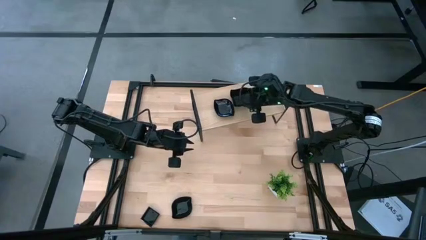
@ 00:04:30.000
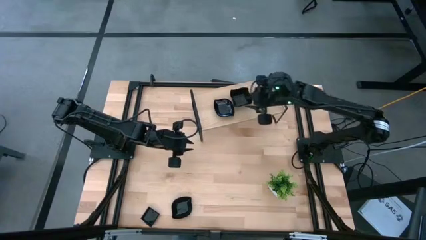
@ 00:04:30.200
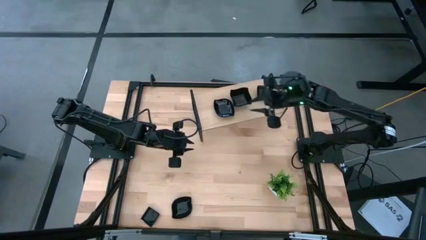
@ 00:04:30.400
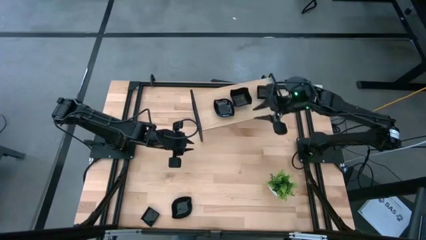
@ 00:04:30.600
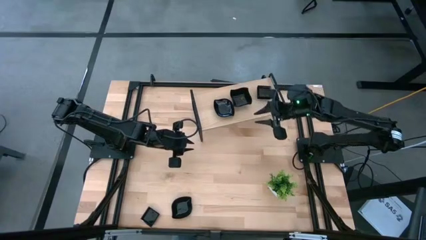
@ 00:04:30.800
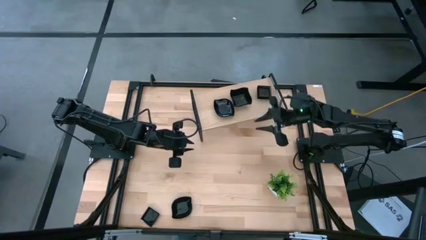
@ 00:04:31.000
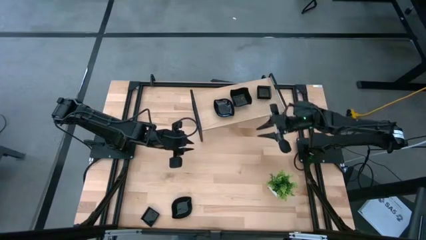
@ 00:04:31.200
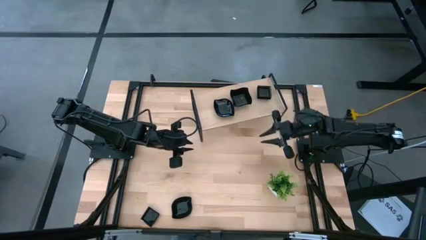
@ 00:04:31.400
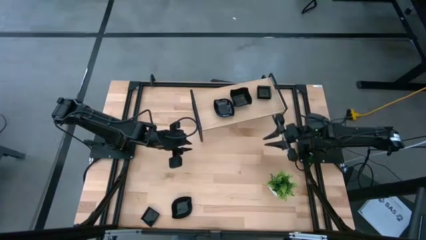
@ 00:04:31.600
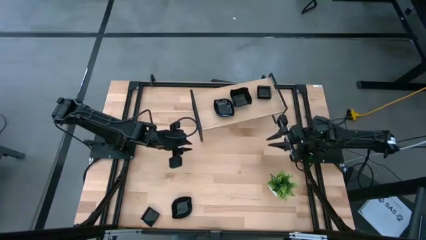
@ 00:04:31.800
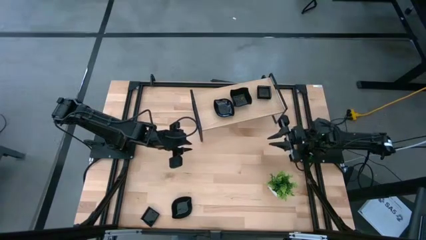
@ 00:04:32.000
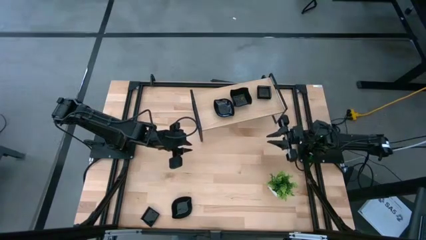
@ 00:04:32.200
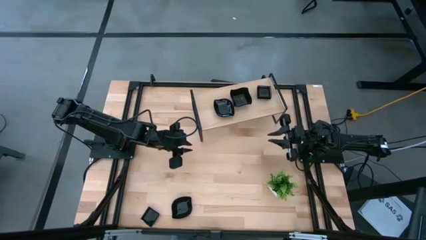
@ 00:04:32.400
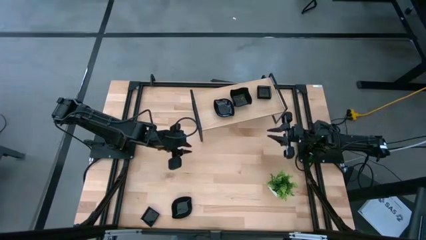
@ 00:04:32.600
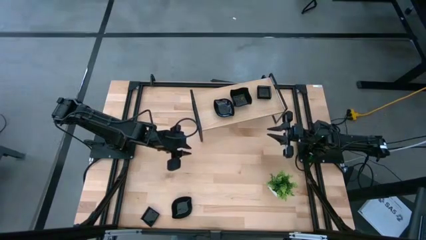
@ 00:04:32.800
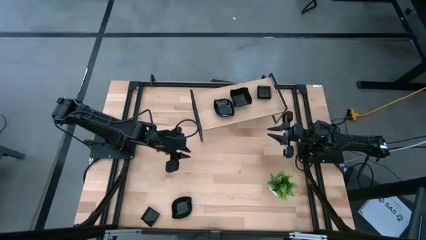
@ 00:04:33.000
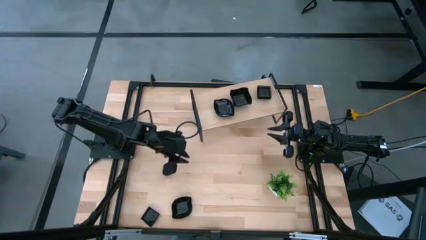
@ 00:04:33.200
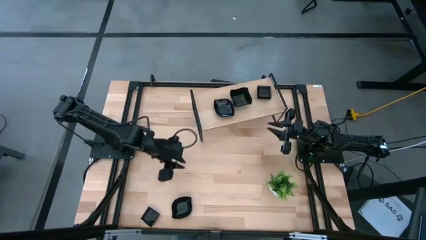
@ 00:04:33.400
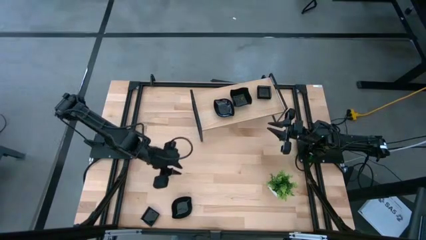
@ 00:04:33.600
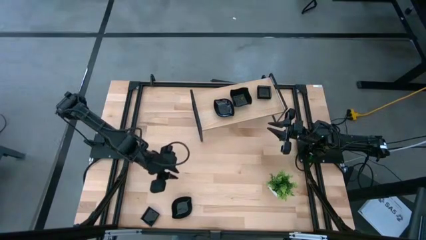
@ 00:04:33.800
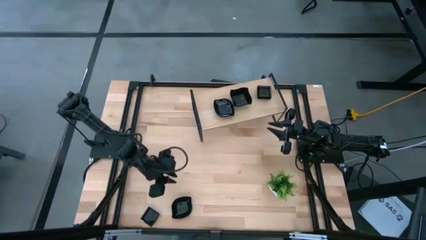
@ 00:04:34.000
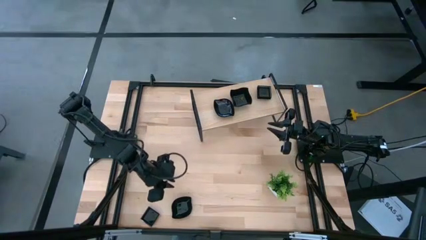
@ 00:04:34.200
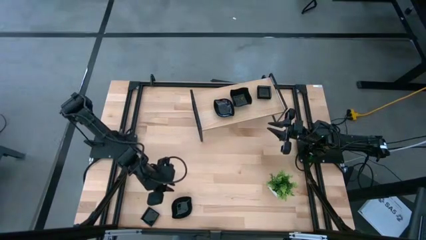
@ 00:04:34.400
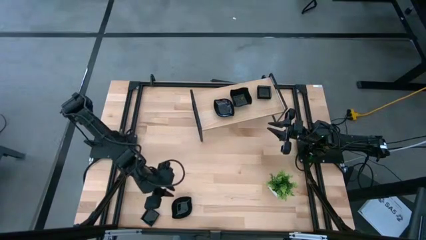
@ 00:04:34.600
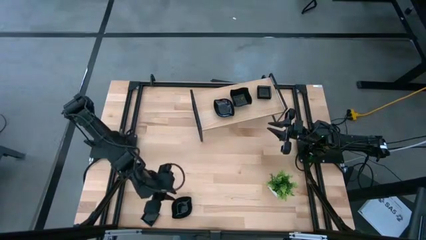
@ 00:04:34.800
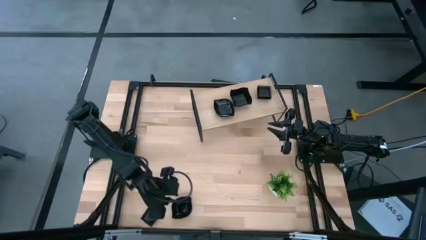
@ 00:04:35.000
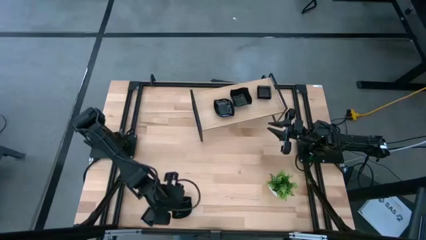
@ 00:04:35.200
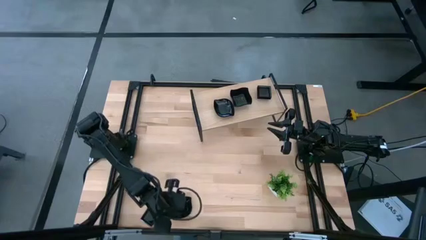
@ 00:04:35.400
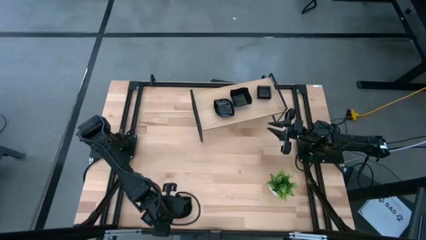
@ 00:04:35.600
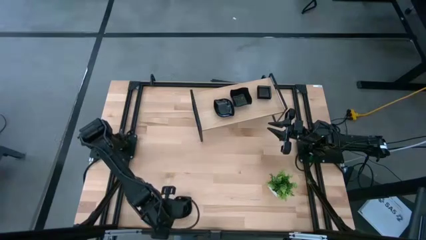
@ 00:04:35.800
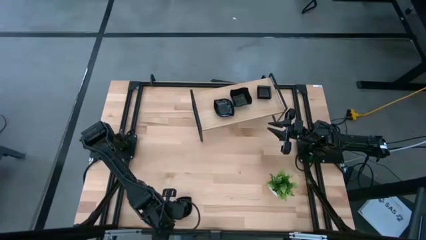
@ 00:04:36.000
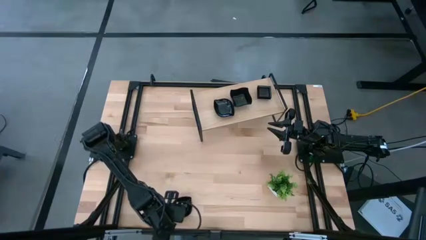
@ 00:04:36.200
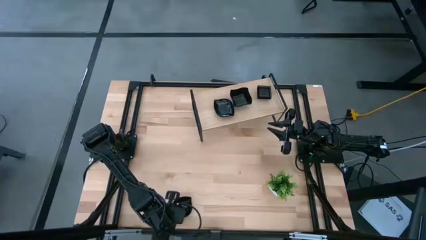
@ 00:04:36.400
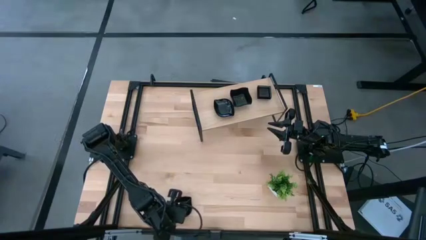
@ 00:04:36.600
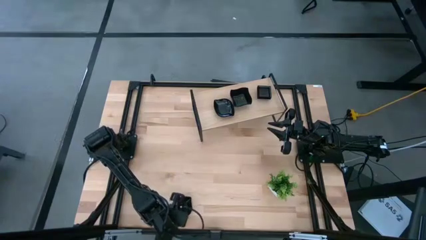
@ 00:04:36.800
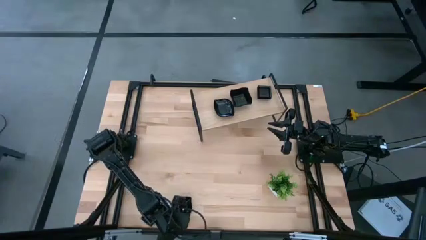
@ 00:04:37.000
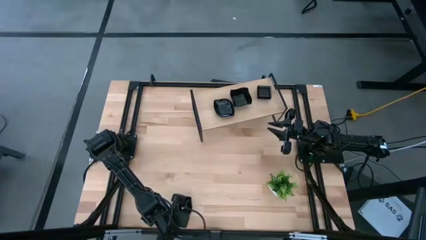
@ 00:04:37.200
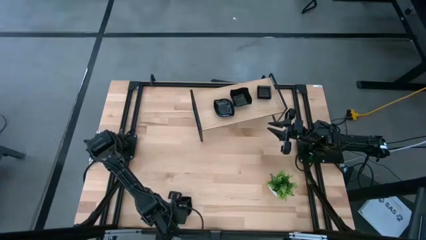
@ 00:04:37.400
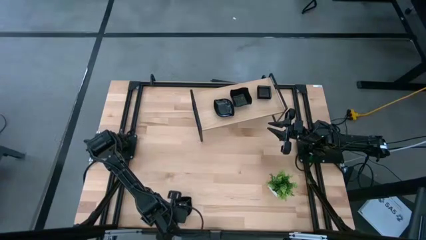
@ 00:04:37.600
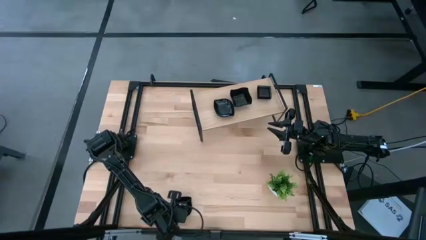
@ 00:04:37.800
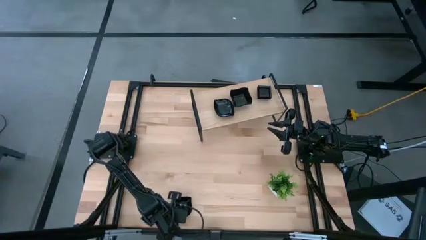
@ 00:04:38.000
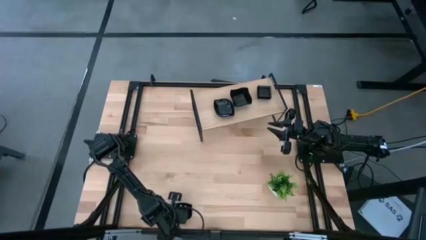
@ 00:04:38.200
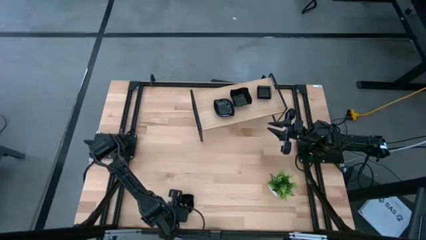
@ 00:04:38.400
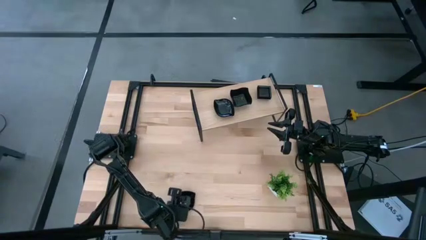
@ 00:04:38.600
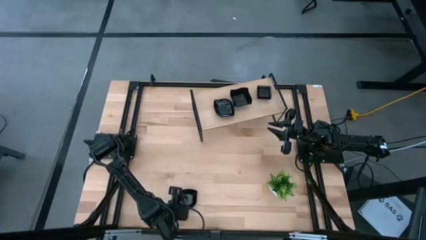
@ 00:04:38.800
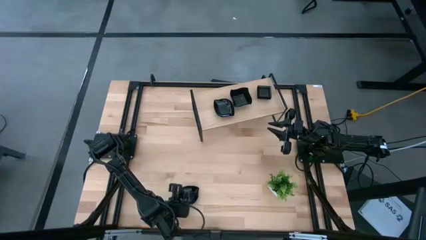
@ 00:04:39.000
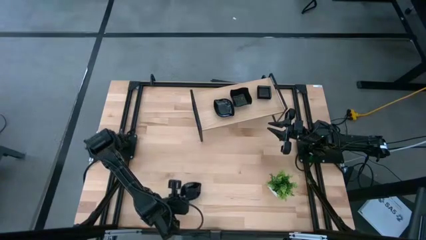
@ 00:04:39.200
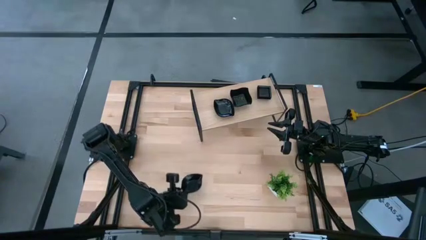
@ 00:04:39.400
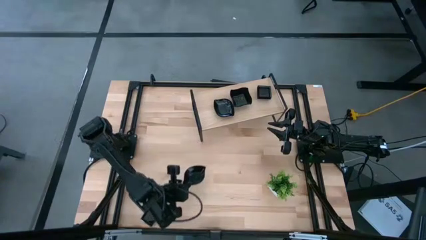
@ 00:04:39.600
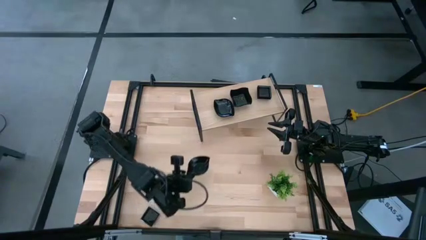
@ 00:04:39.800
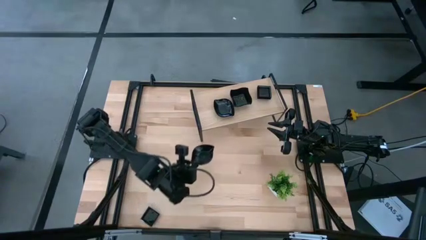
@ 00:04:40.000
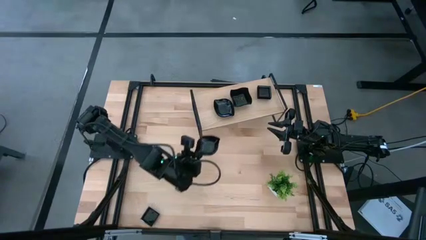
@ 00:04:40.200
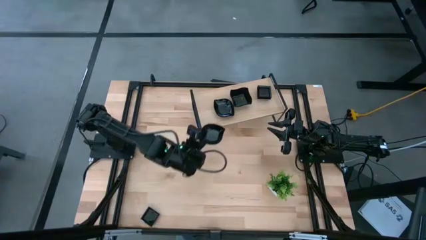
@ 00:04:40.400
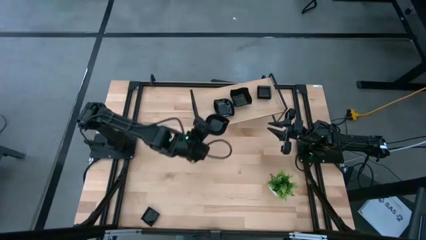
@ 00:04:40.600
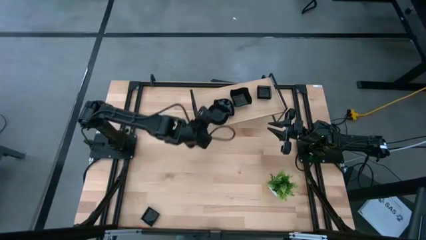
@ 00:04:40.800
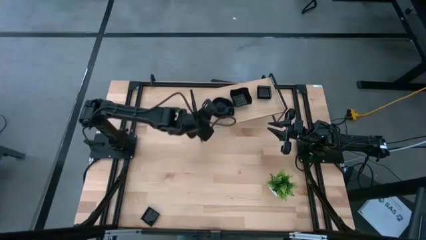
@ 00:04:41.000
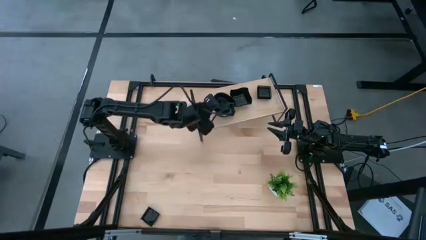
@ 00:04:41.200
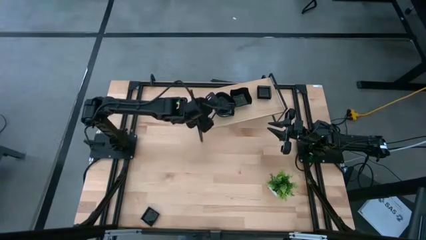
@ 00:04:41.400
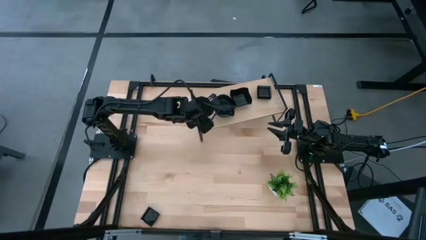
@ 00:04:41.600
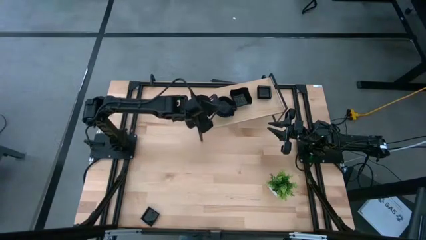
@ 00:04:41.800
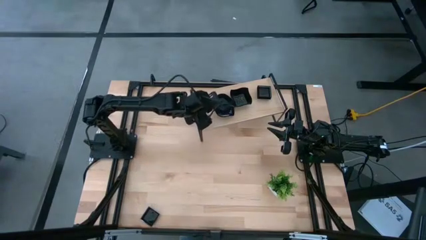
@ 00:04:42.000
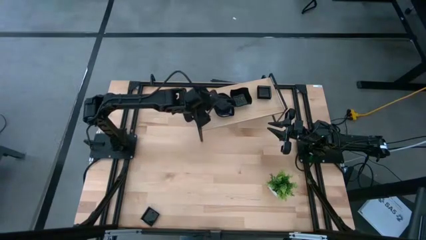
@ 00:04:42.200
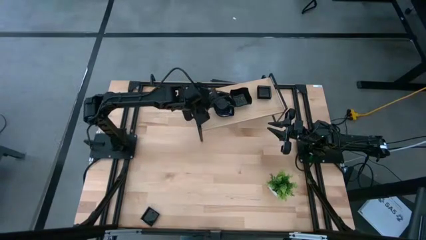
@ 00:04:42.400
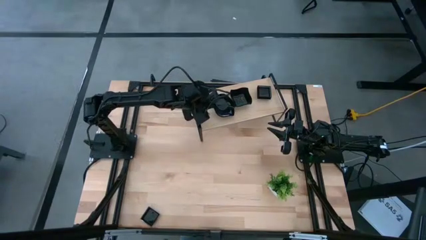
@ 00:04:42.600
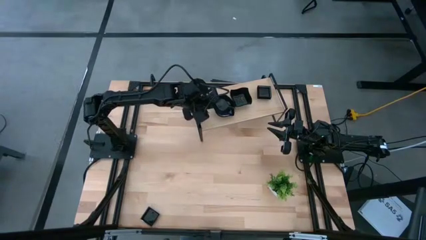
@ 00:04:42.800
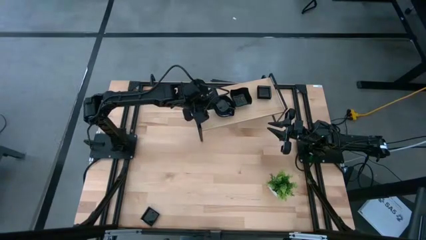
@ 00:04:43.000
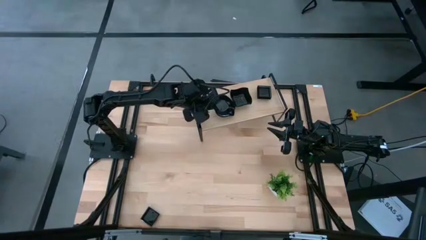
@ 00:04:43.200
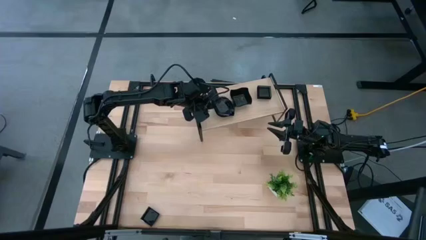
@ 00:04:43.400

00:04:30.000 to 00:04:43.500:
Task: Pick & Place Mini shaped plates
Stack the leaf-shaped plate on top of the leaf-shaped plate on the shelf
